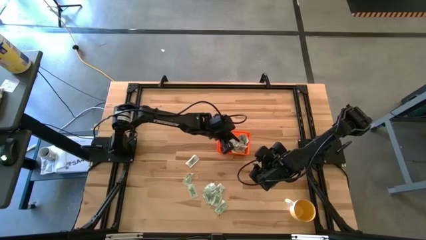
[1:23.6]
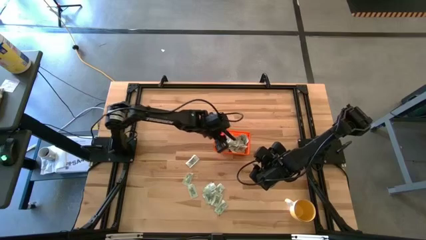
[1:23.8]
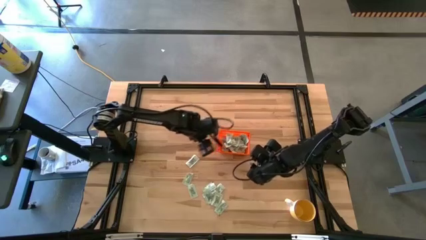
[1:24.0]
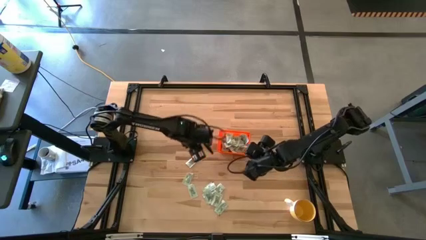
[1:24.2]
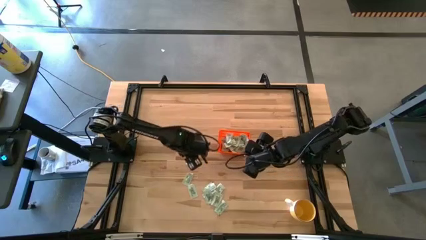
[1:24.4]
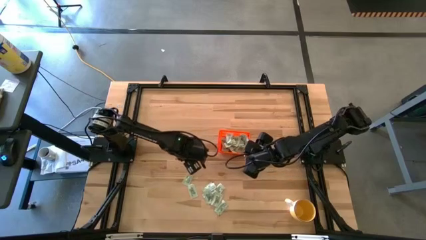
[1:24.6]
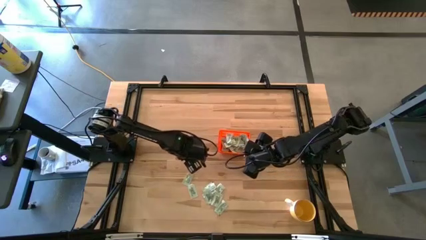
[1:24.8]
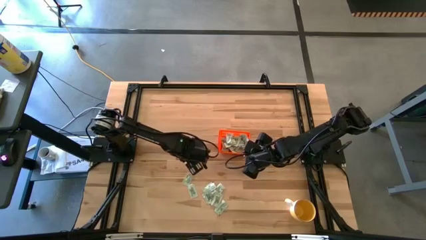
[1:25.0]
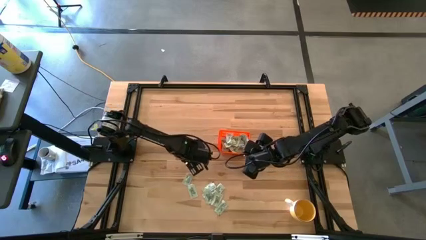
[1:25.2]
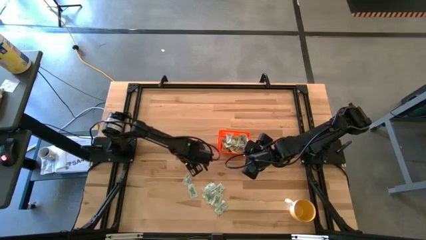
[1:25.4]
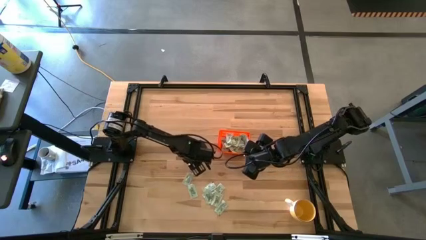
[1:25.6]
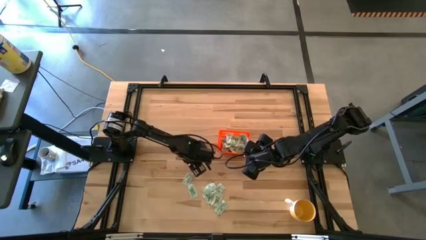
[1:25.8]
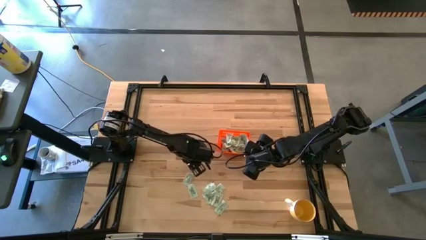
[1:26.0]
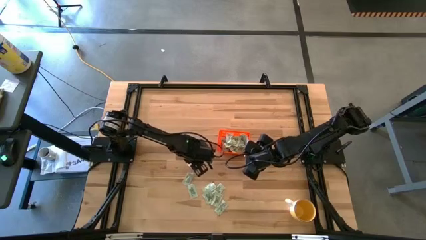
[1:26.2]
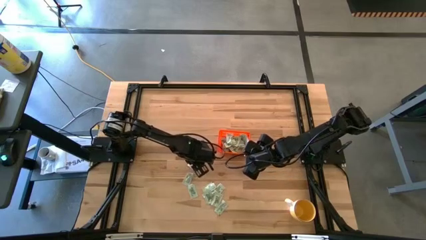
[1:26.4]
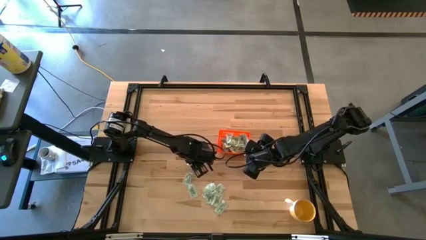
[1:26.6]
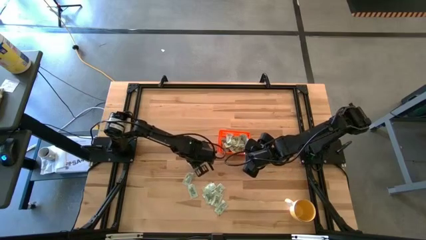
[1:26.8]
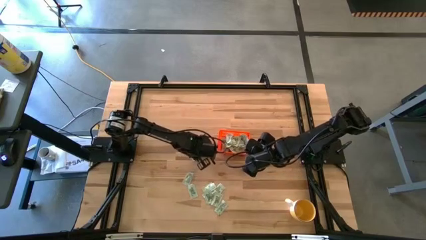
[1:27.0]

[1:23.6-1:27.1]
Task: Pick and place Stevia / Truvia into bins
Put the white stevia packet into the orange bin

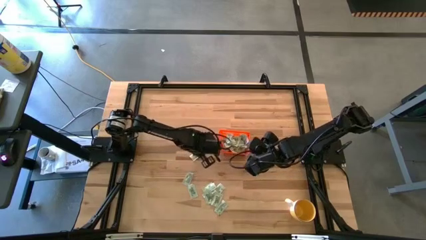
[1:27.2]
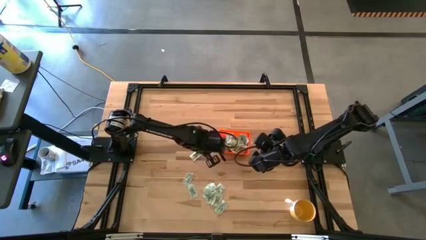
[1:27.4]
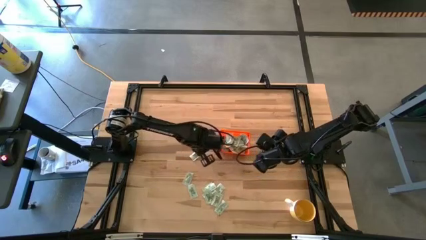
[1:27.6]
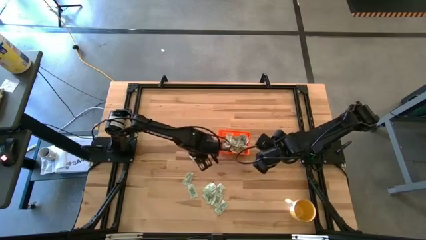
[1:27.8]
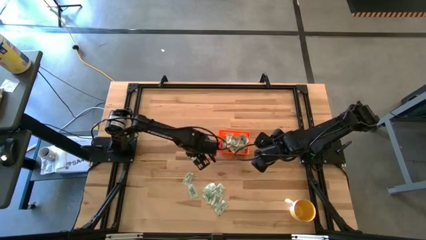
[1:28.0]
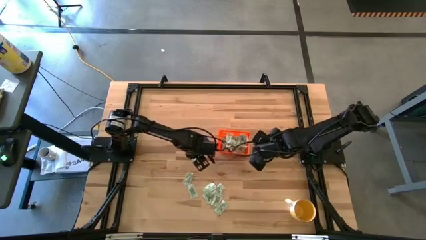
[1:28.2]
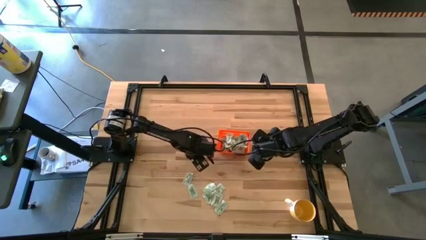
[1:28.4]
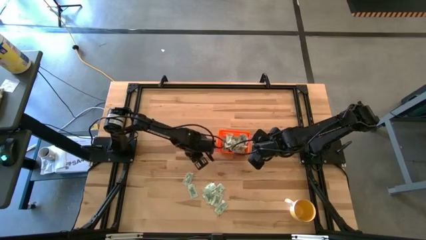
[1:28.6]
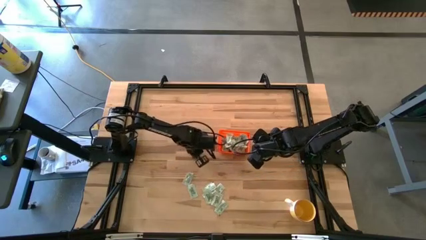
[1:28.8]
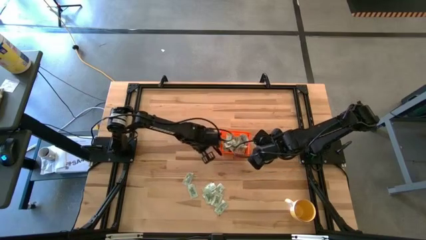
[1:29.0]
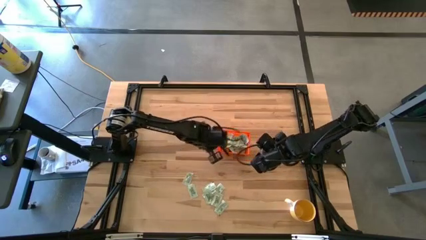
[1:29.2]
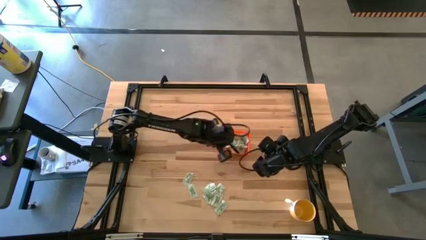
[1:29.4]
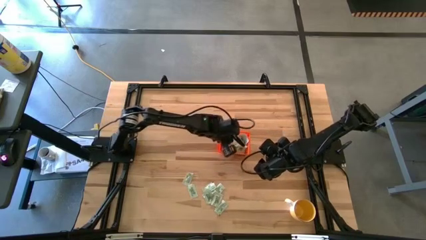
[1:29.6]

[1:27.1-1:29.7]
Put the white stevia packet into the orange bin

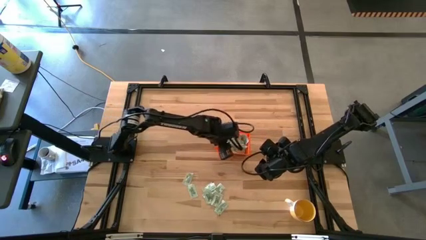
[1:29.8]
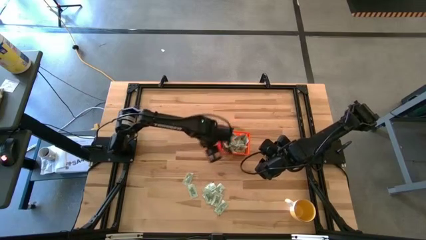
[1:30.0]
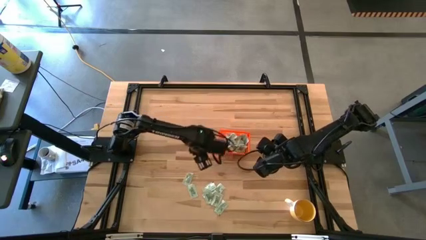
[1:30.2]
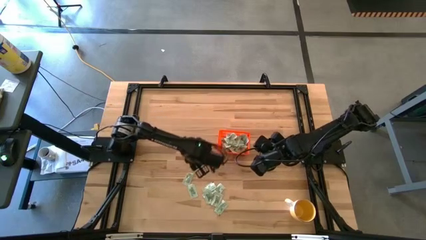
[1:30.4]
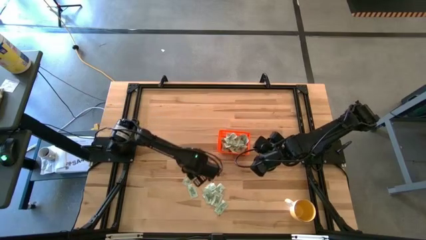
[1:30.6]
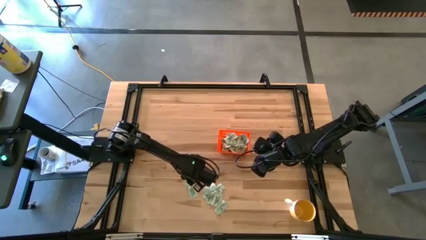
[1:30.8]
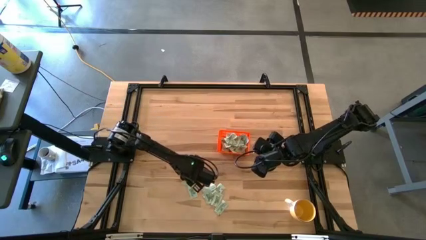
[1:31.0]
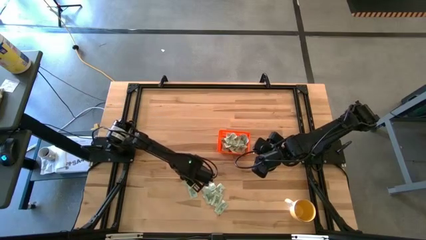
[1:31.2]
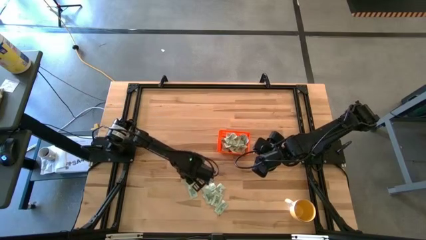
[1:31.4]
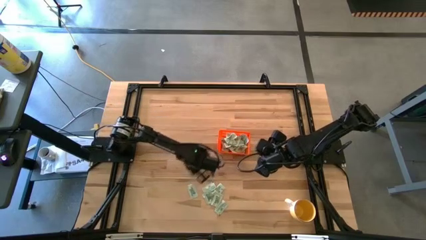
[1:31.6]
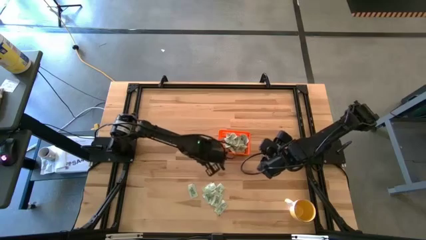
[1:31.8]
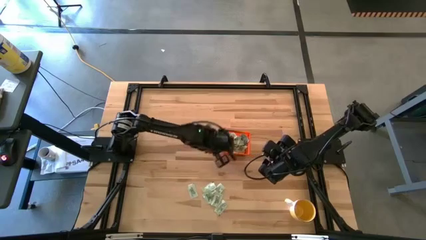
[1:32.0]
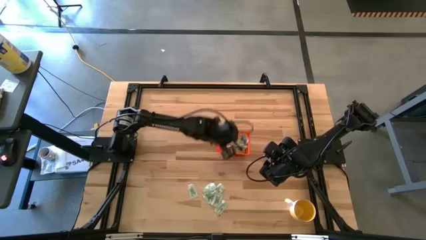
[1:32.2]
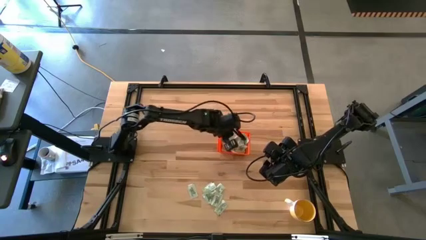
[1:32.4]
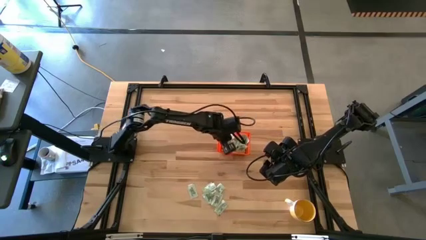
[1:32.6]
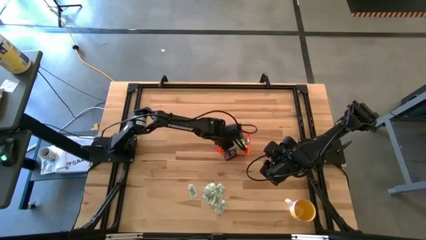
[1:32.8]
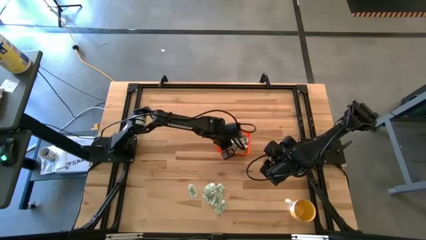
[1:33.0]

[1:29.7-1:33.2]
Put the white stevia packet into the orange bin

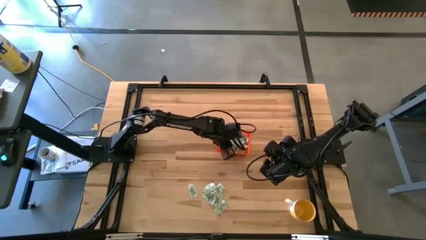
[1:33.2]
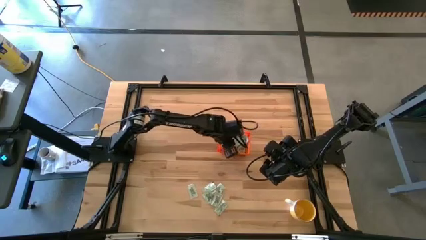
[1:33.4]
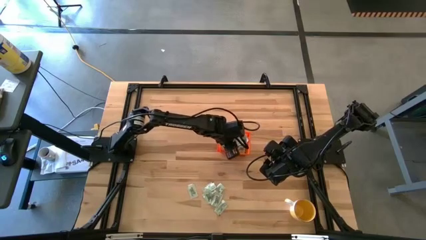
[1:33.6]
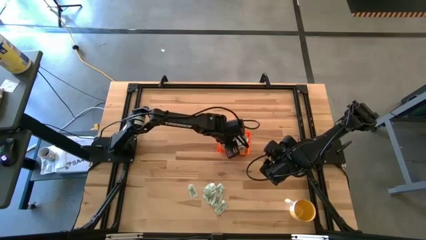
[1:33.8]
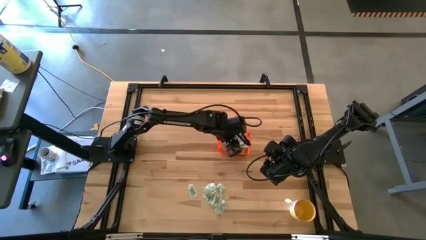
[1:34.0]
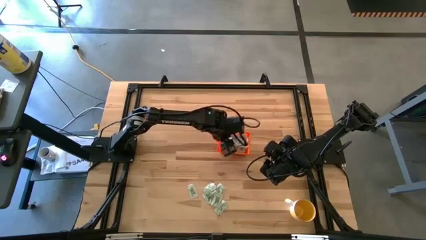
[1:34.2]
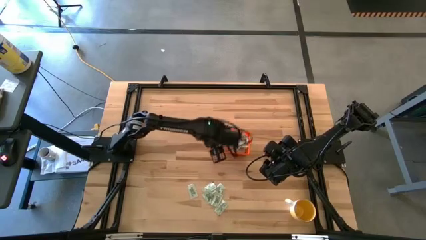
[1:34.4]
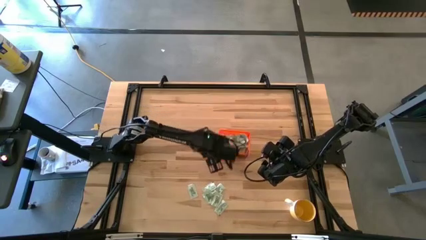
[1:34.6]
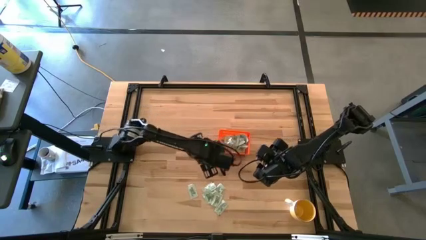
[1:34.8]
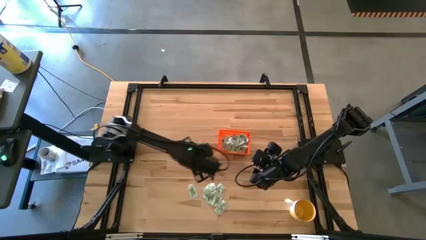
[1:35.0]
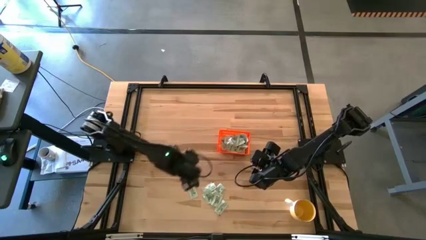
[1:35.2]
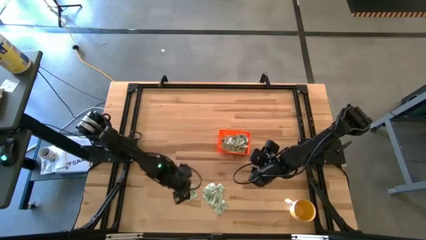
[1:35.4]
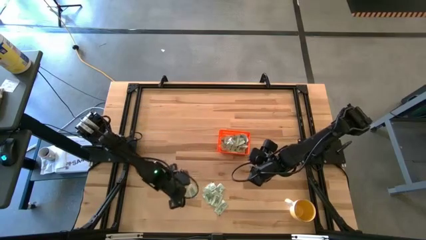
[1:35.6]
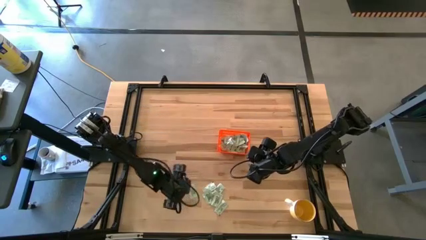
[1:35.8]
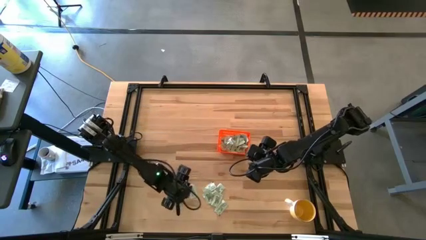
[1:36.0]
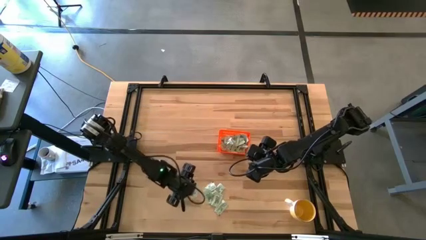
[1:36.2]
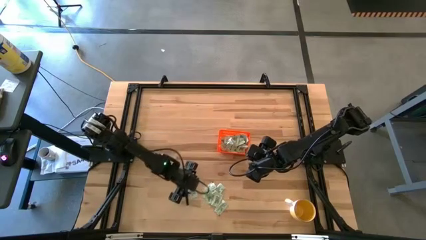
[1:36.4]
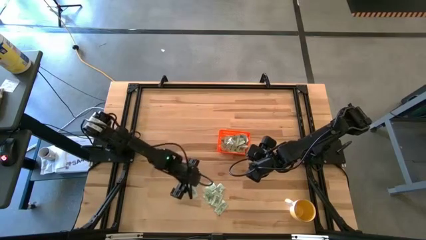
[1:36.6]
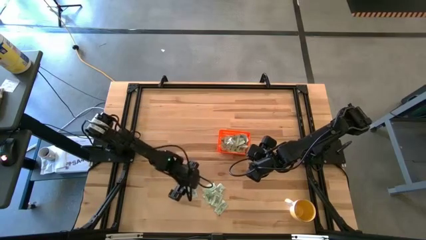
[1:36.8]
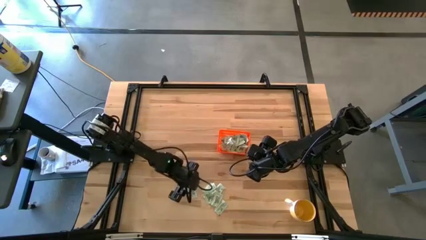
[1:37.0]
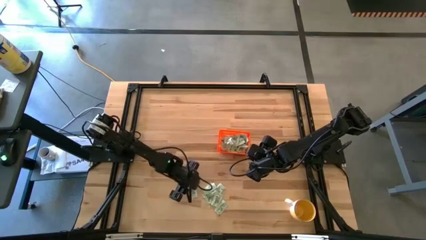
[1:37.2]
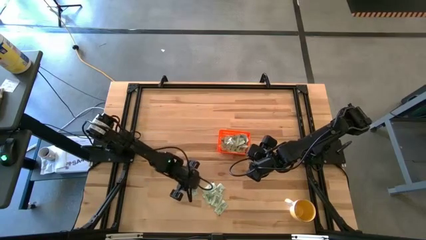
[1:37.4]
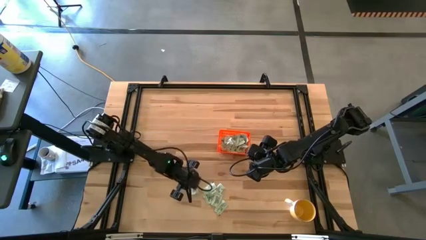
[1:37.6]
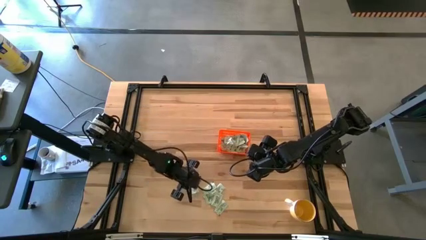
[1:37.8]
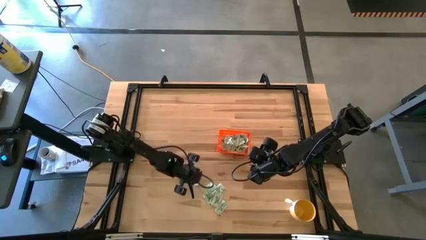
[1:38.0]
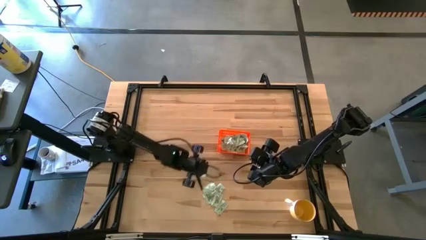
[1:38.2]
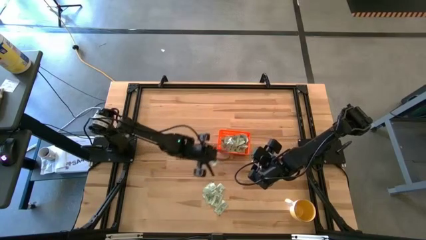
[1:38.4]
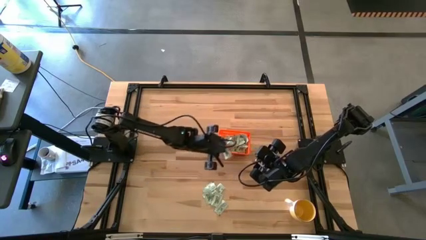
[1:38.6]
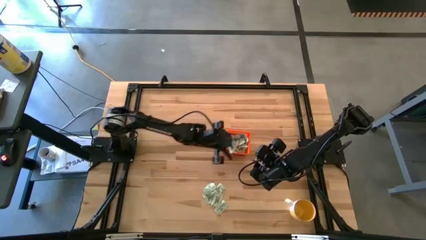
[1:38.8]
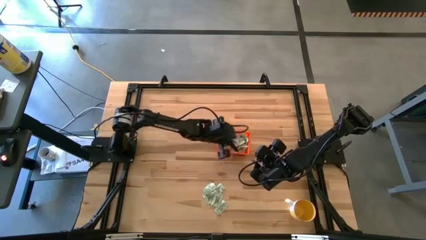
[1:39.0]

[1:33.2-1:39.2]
Put the white stevia packet into the orange bin

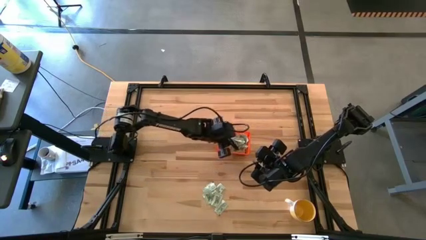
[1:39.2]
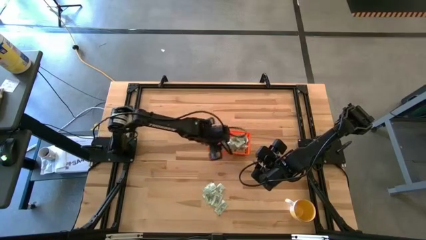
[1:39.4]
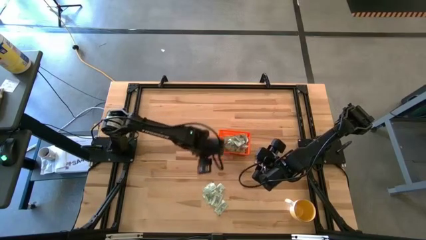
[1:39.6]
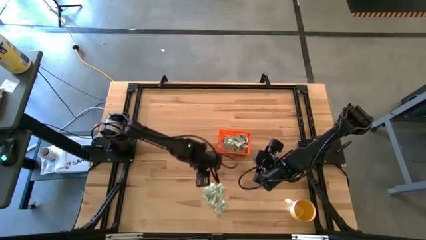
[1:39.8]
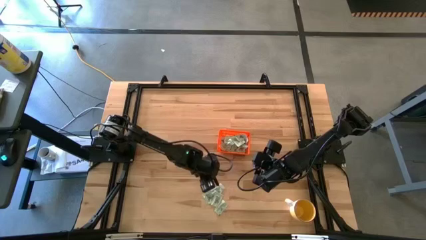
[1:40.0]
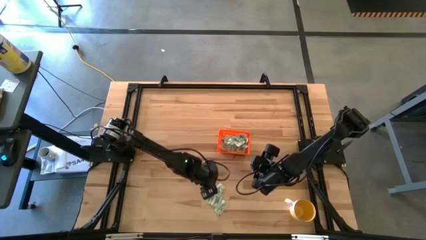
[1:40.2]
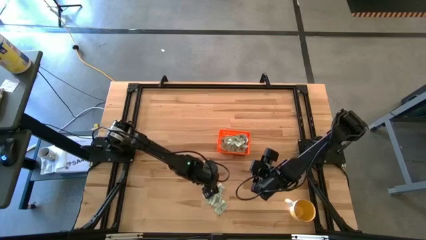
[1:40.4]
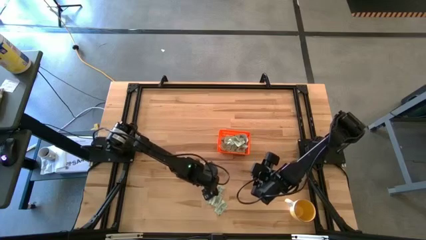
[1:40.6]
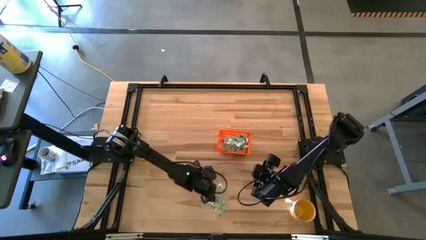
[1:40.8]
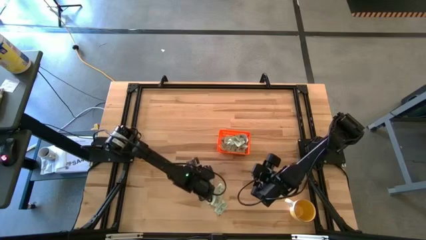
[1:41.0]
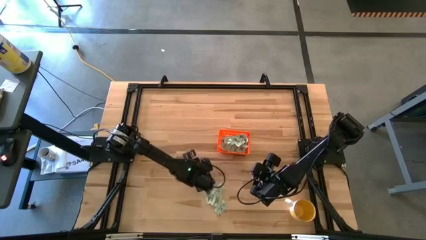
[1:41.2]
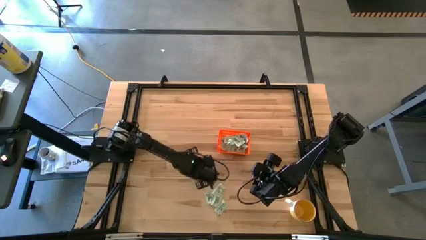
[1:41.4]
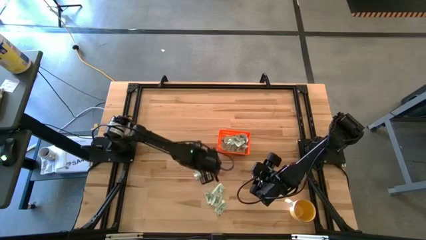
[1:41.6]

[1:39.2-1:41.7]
Put the white stevia packet into the orange bin
